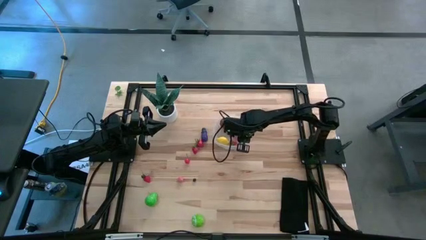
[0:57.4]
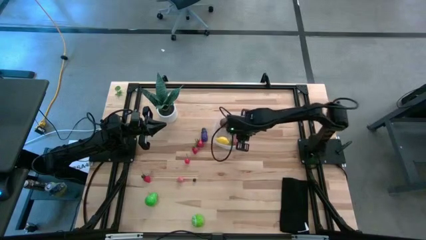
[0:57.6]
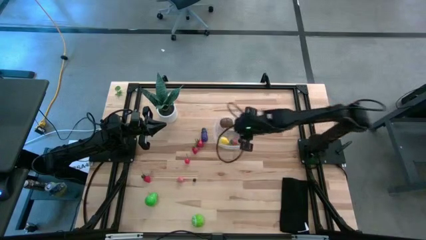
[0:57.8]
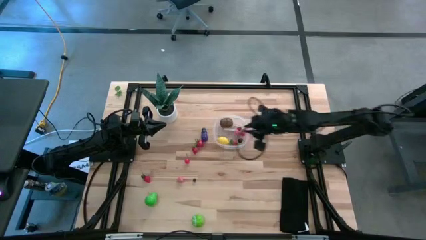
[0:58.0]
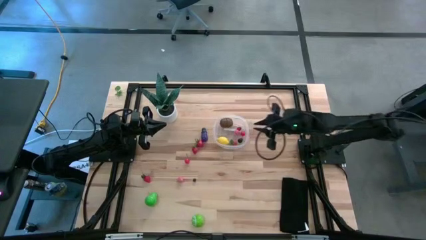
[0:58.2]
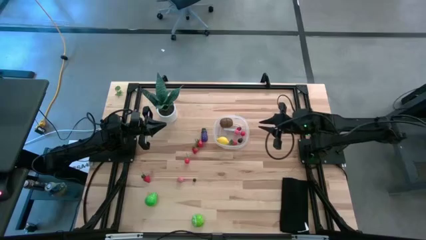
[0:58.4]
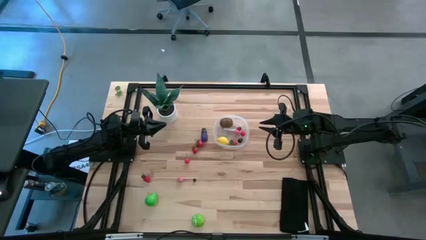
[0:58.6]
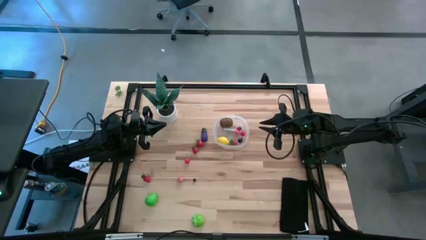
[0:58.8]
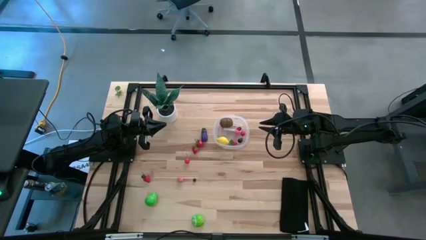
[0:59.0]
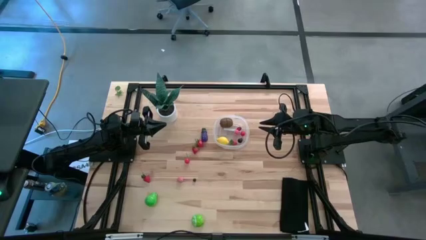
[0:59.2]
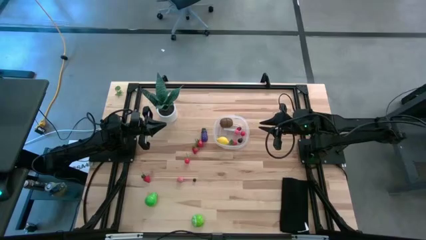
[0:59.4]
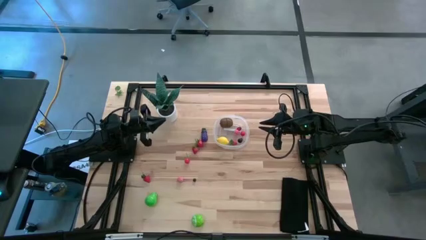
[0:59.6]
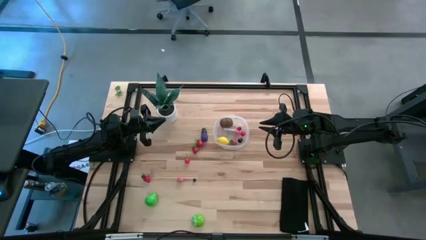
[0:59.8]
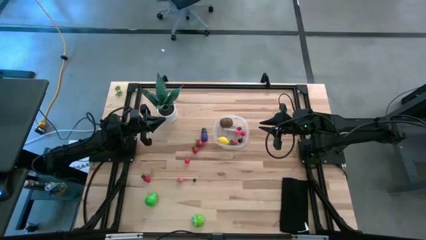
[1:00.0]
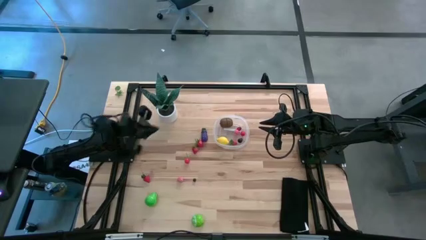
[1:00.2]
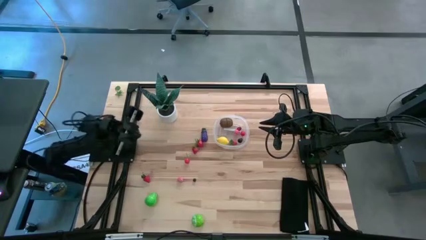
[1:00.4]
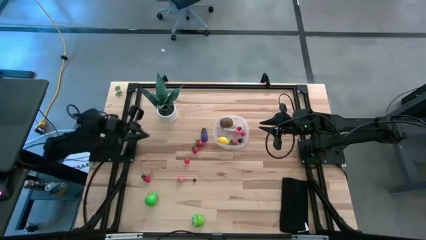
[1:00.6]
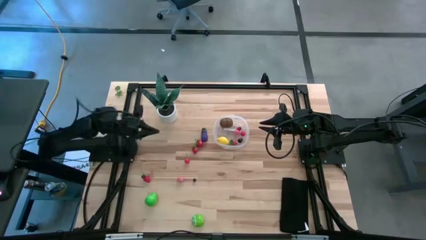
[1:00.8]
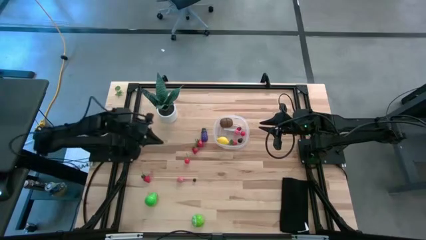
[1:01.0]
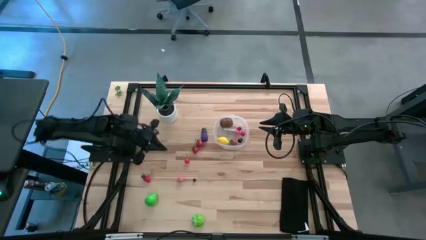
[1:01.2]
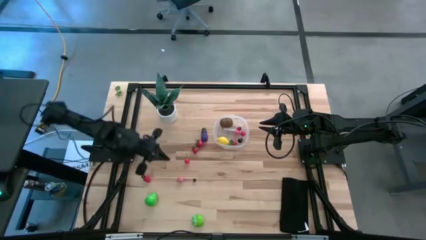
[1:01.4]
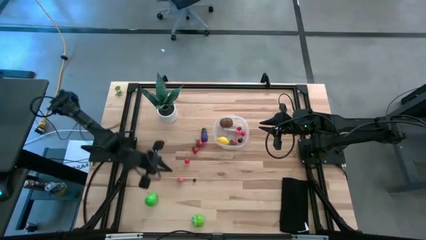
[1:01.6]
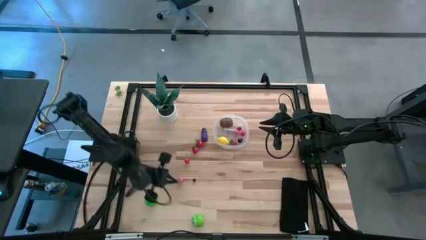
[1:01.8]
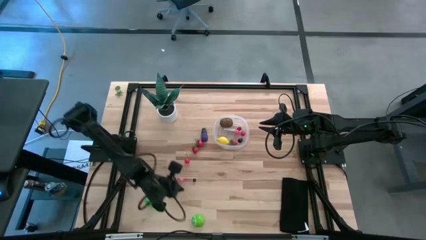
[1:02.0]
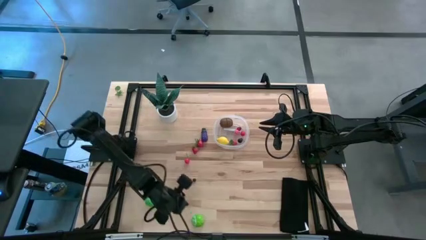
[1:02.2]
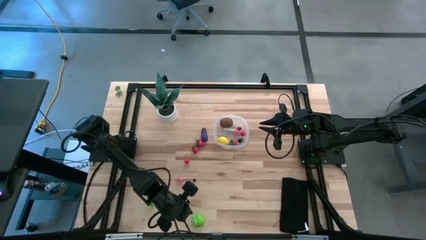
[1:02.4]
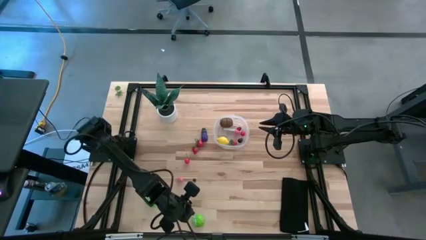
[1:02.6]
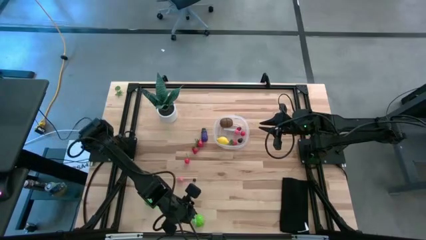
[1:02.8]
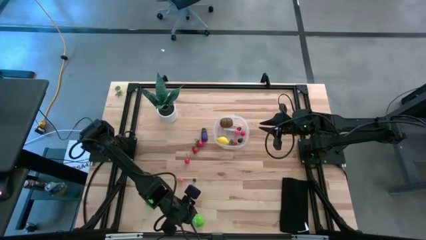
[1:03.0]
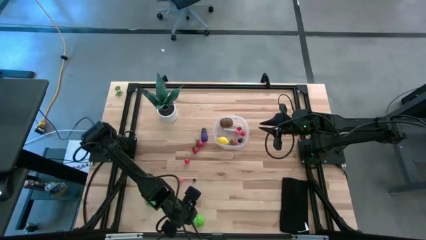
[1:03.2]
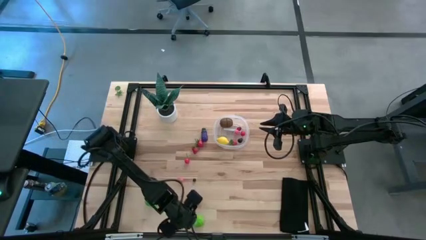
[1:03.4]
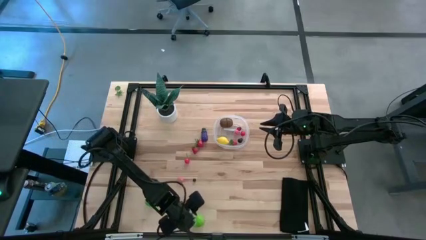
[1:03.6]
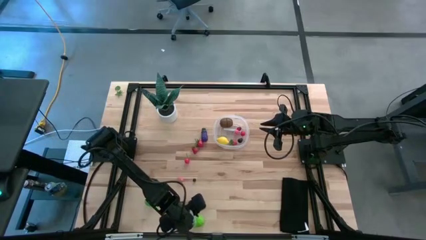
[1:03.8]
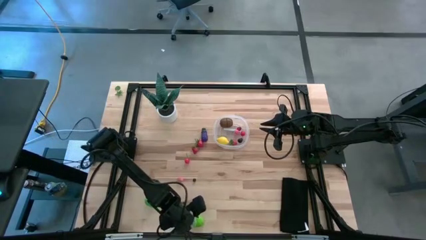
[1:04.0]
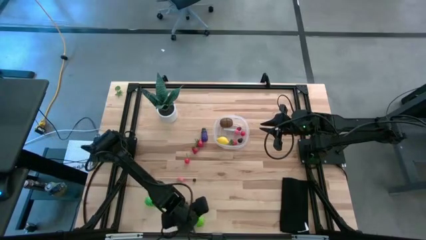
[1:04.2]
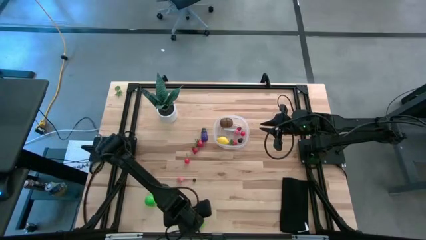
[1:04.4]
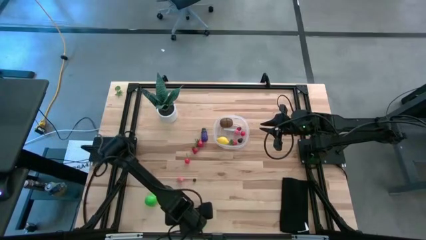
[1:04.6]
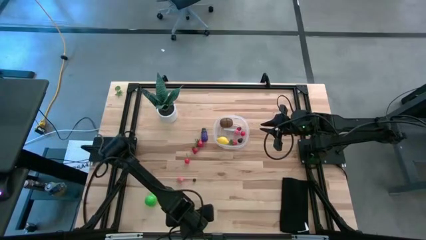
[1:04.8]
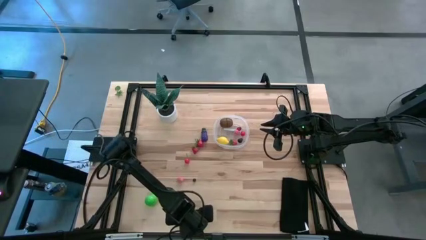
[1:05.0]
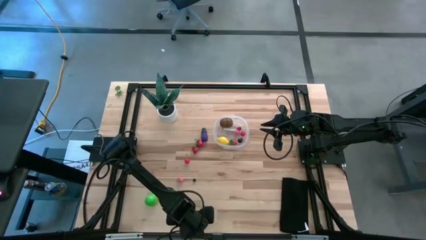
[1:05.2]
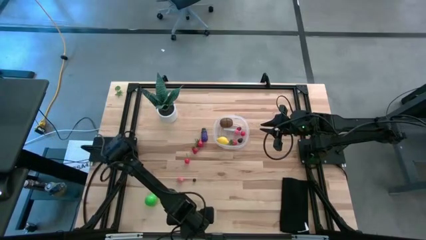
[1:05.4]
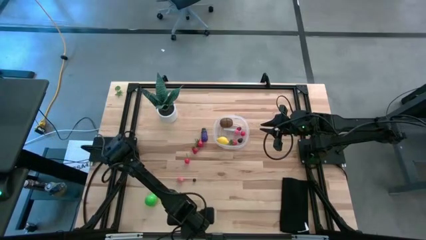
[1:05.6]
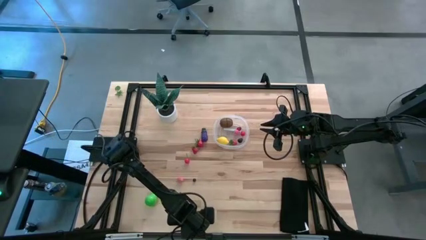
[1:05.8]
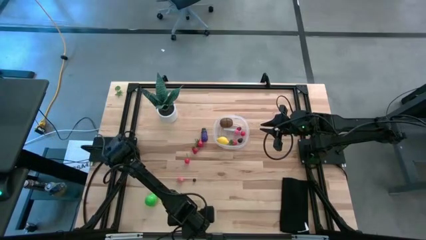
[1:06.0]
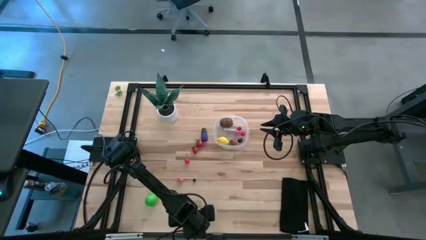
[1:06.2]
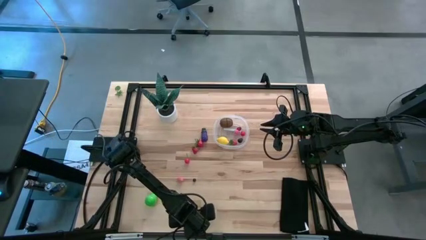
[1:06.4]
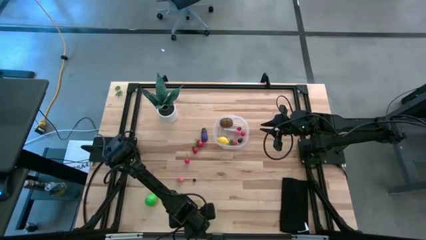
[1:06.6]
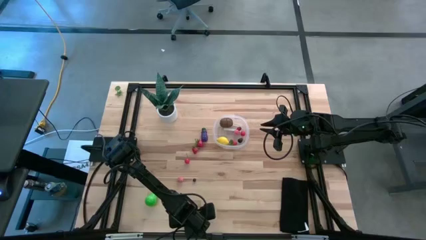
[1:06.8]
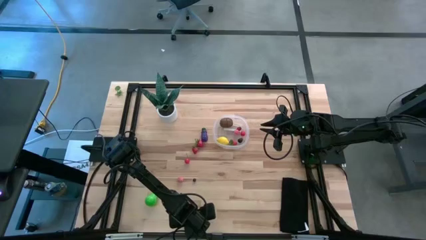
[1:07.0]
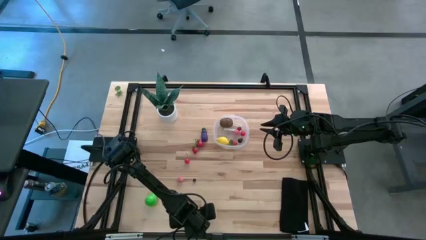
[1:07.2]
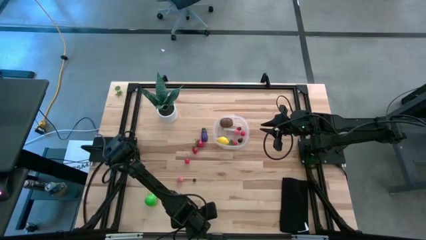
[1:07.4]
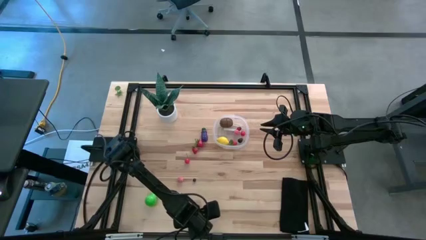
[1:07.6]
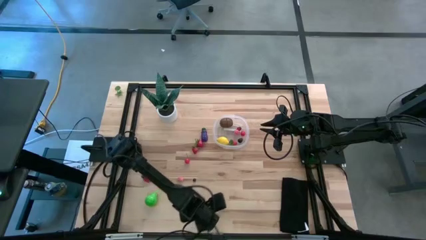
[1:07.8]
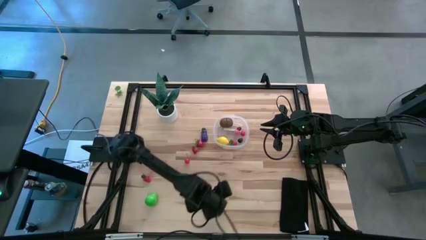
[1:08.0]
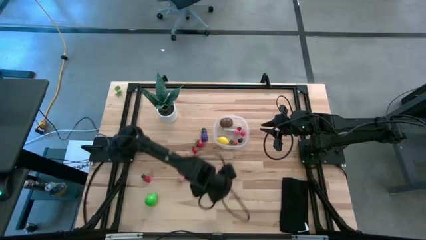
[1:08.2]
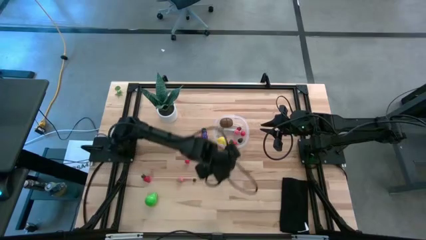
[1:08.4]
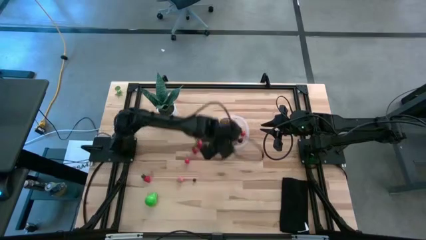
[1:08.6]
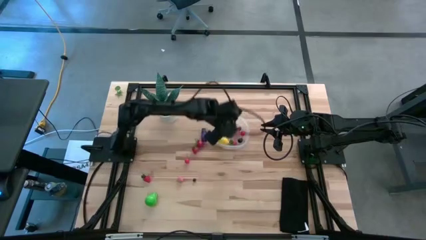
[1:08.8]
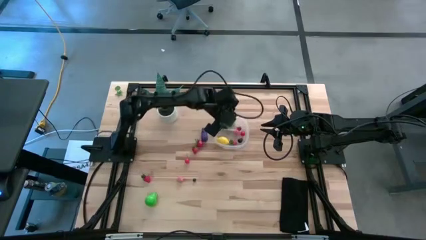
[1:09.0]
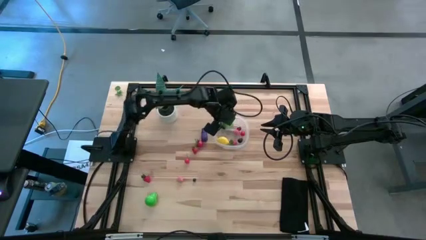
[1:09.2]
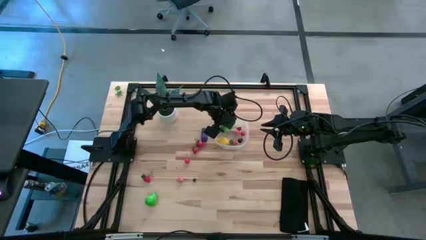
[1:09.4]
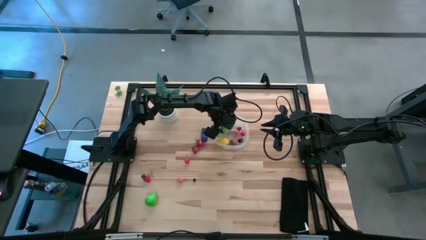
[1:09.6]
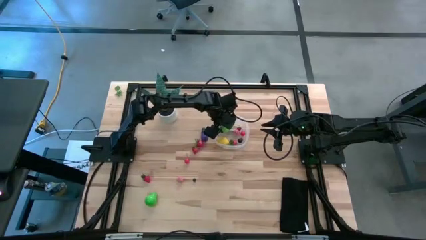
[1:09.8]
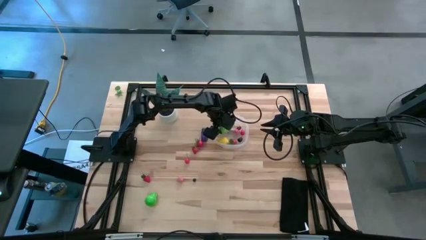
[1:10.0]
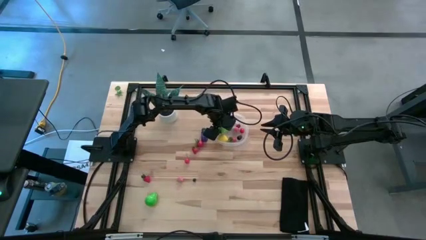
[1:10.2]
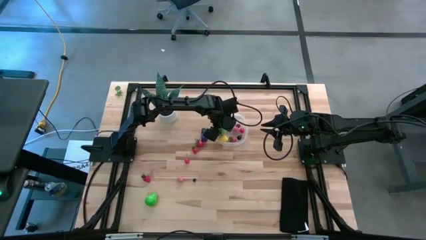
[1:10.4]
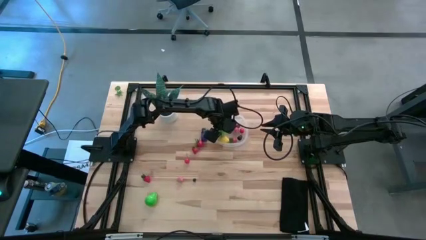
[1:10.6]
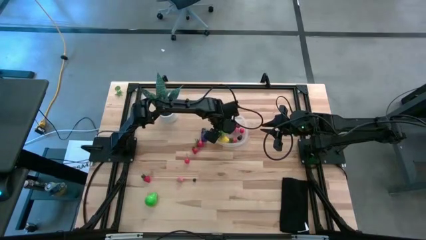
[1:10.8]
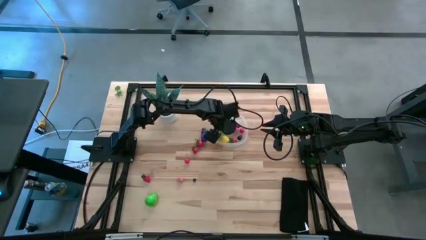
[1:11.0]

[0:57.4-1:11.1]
Task: Pick and placing Produce into tupperware
Put the cabbage into the transparent bin

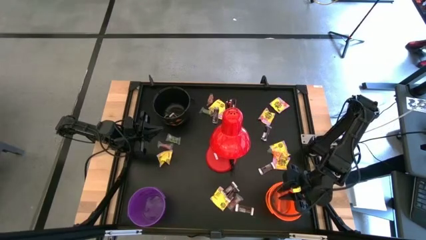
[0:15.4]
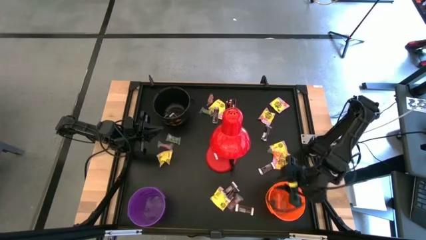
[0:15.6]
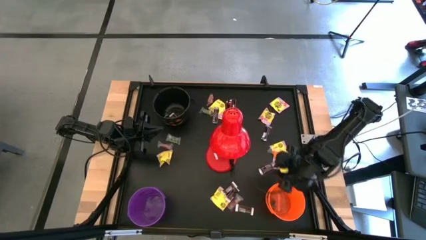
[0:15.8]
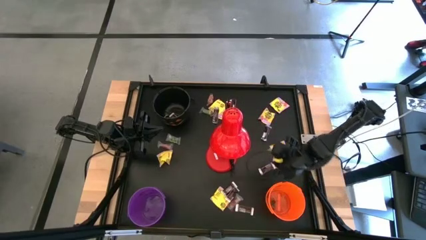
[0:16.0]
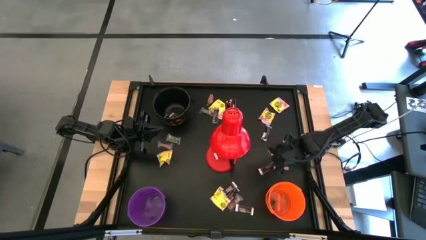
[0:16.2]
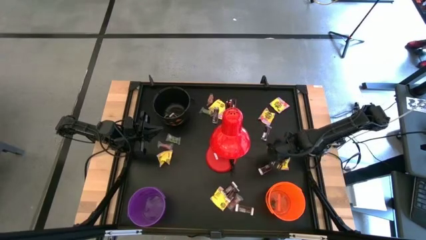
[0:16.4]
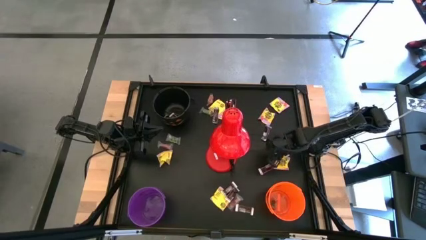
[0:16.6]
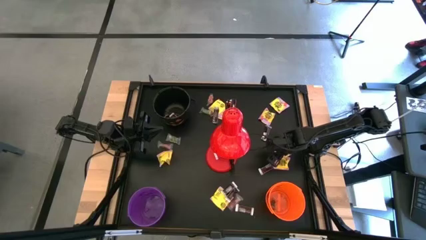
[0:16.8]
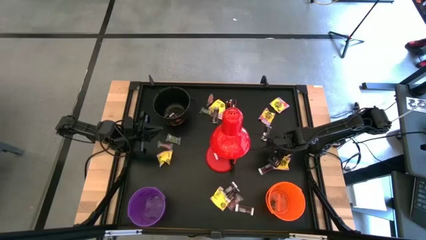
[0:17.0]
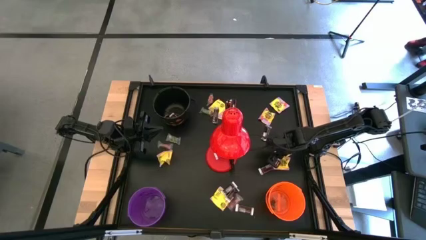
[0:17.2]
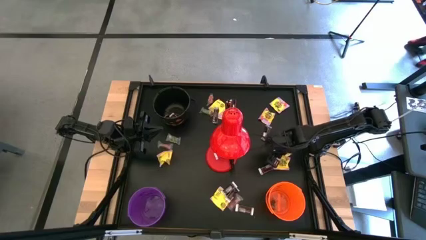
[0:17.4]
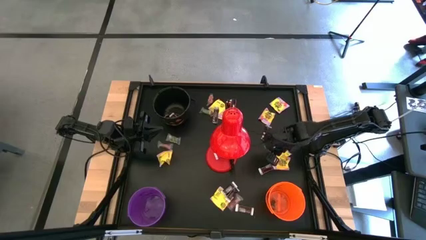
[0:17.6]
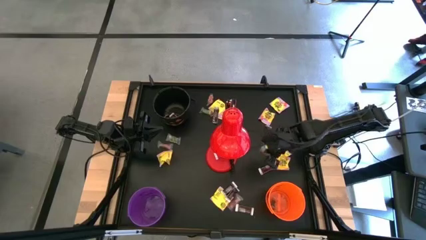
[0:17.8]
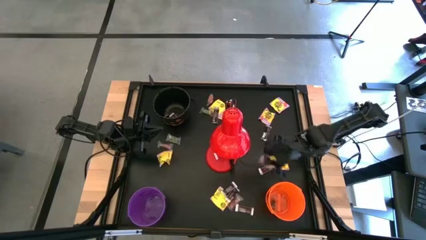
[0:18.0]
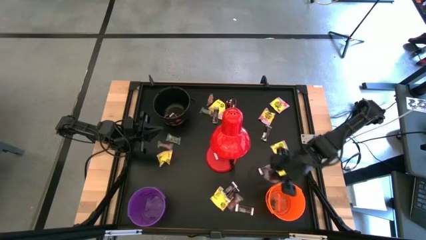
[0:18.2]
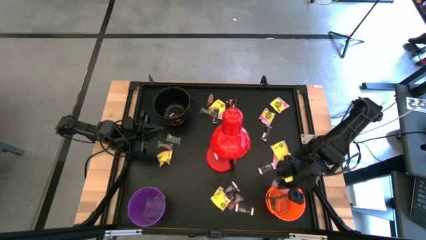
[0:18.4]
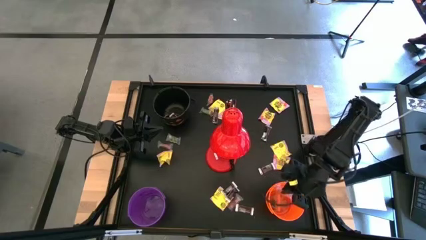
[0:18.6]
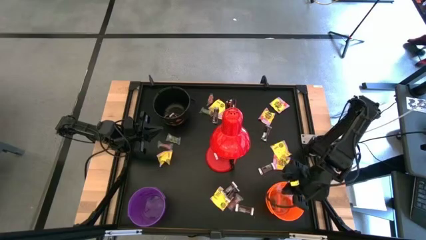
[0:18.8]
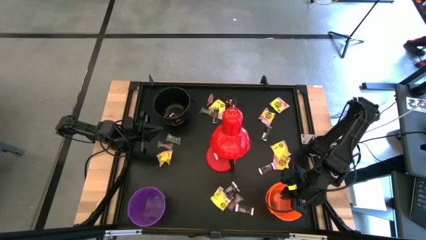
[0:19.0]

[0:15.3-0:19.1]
Task: Organize candy in baskets
Put the orange gummy into the orange bucket
